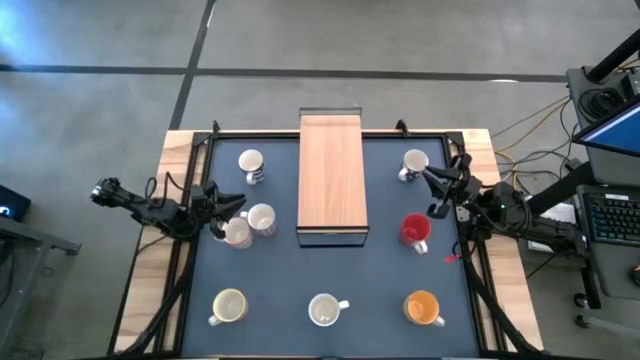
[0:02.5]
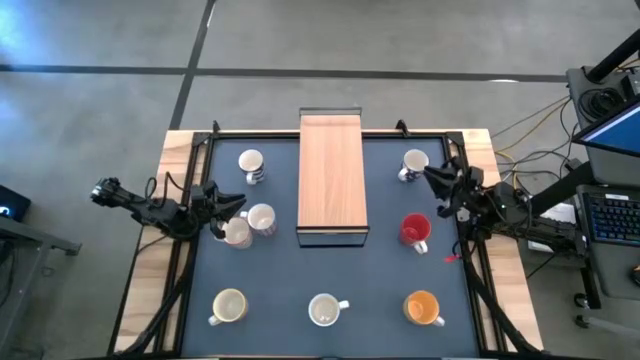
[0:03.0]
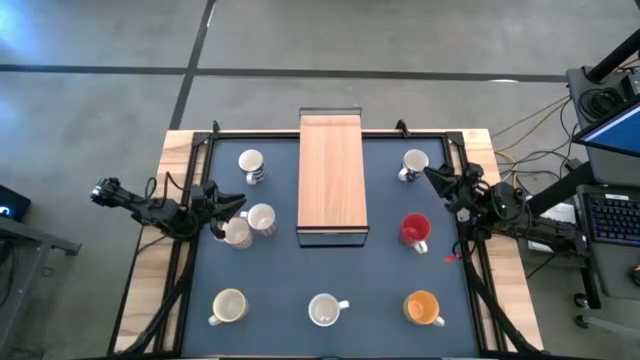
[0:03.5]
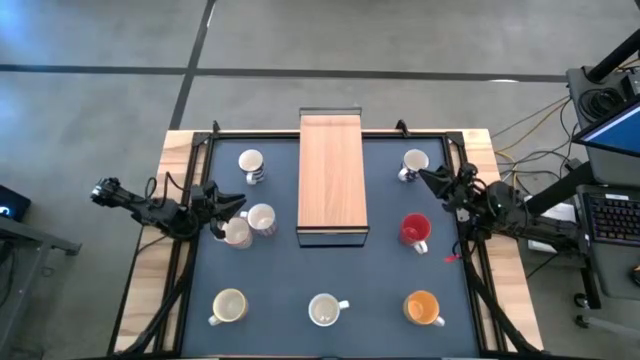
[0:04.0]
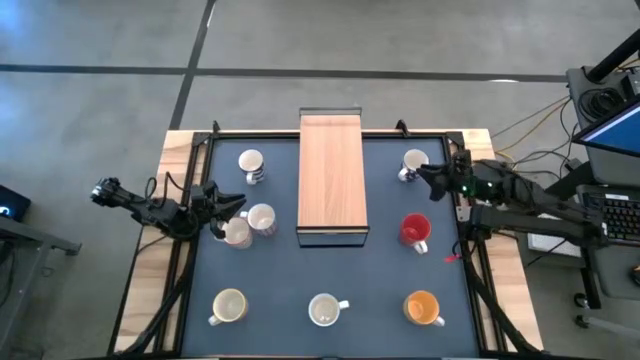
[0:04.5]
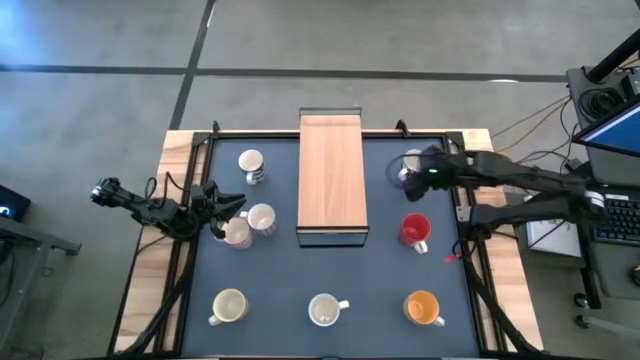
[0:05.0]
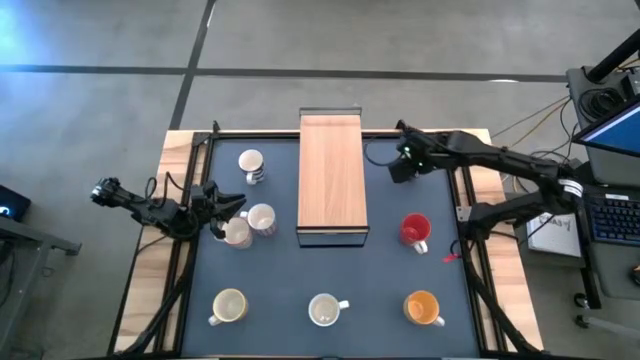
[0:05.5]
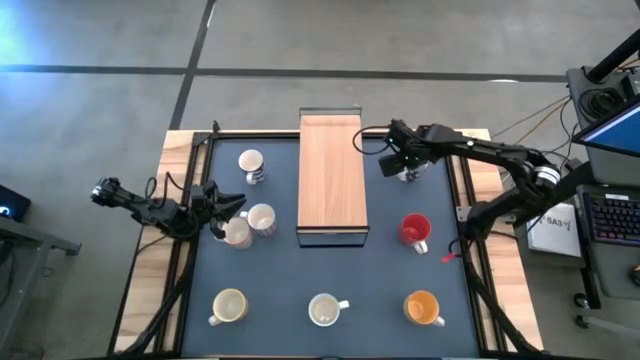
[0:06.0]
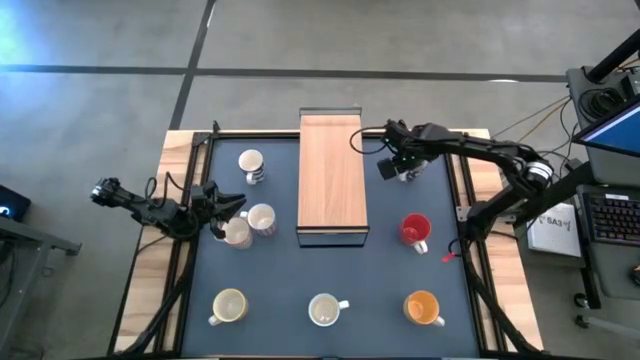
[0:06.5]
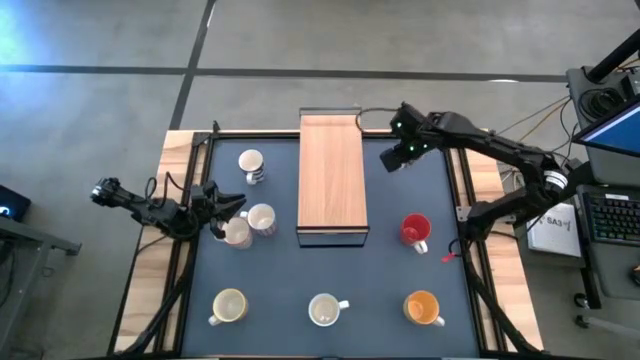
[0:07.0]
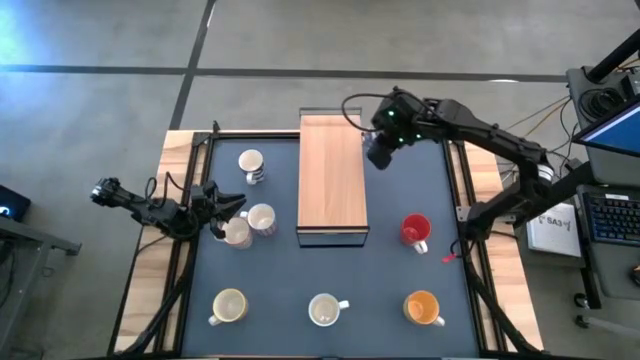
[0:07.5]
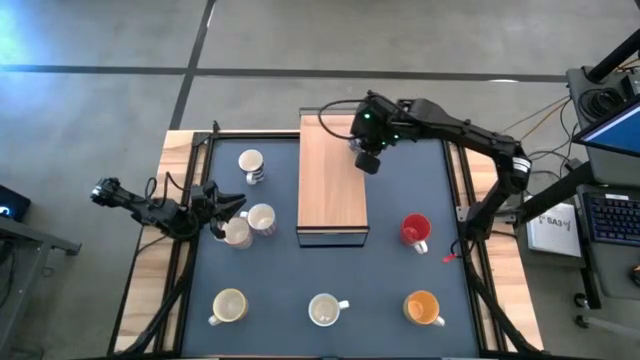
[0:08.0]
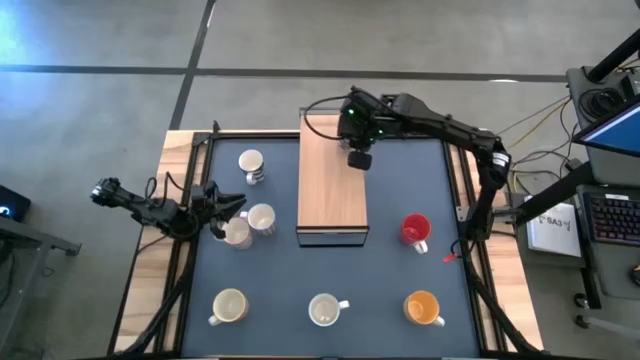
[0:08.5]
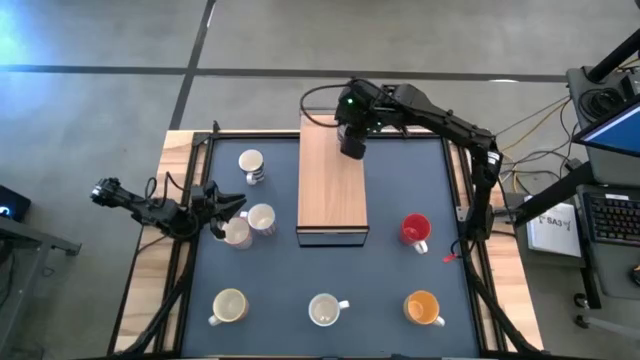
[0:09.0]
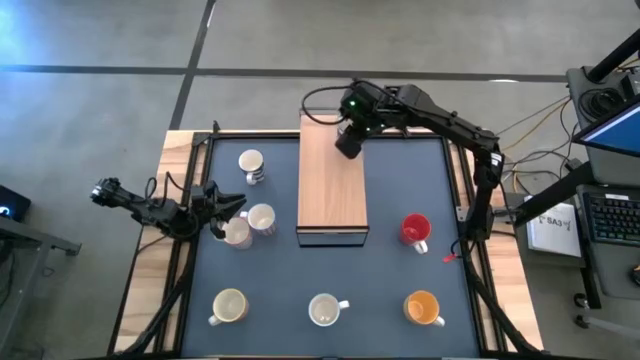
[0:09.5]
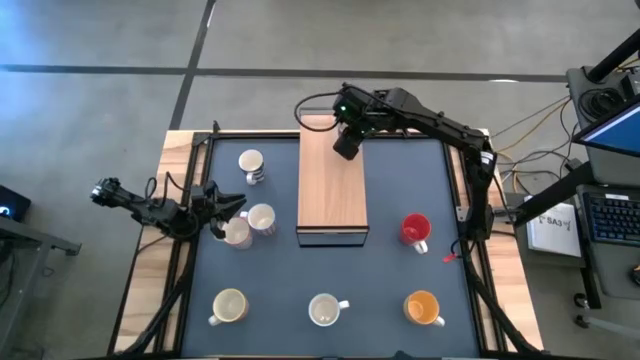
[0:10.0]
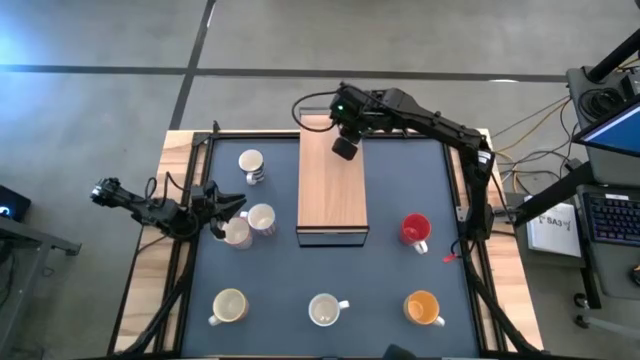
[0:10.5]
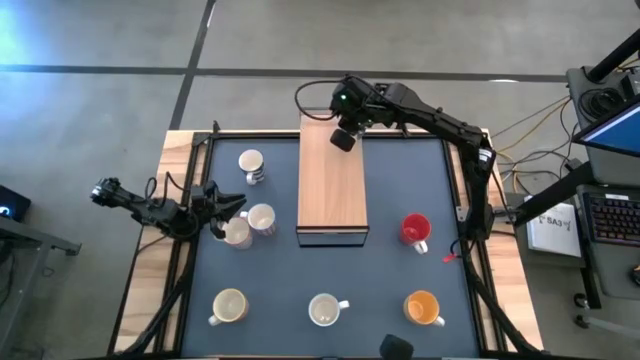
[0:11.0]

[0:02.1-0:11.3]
Task: Place coffee mugs
Put the right blue patterned mug on the shelf

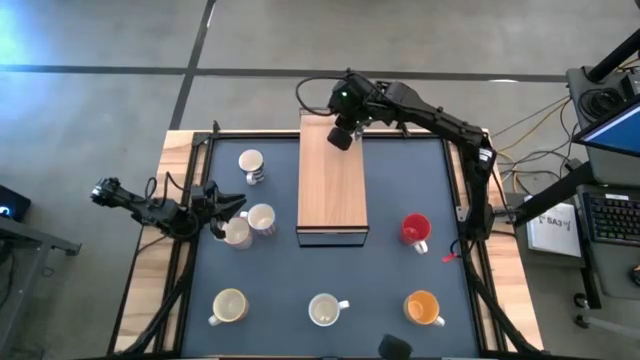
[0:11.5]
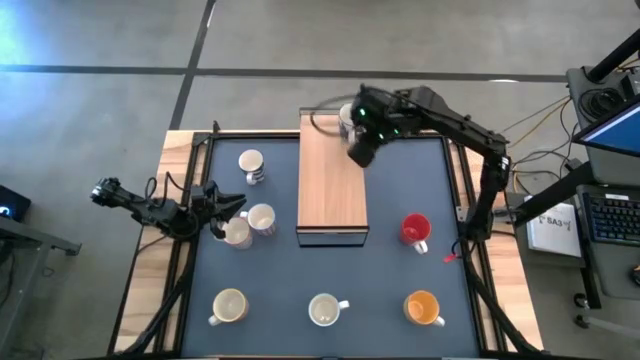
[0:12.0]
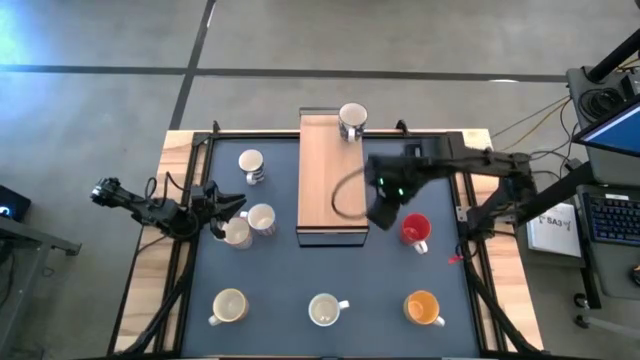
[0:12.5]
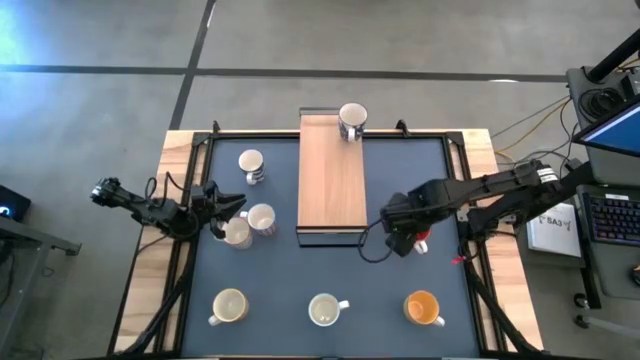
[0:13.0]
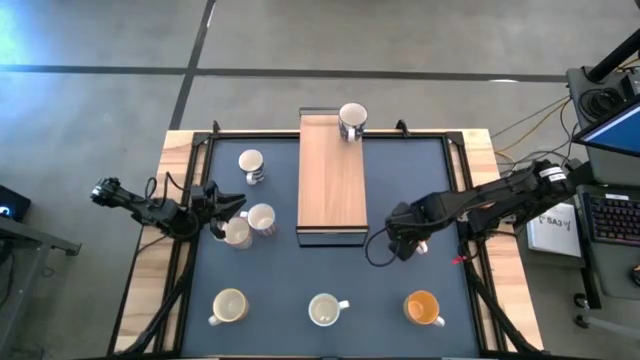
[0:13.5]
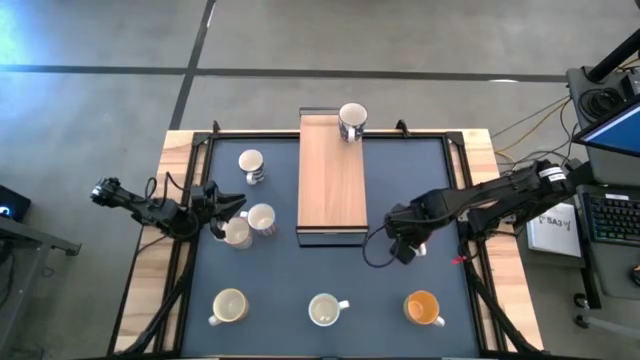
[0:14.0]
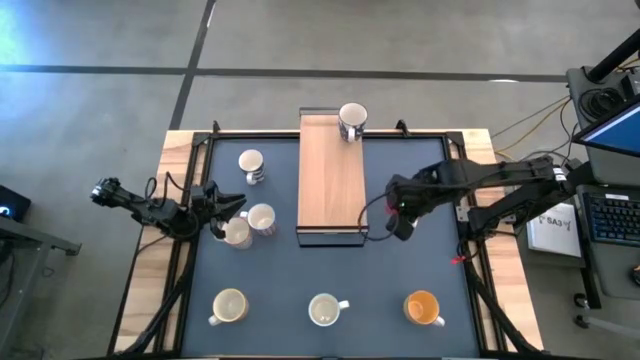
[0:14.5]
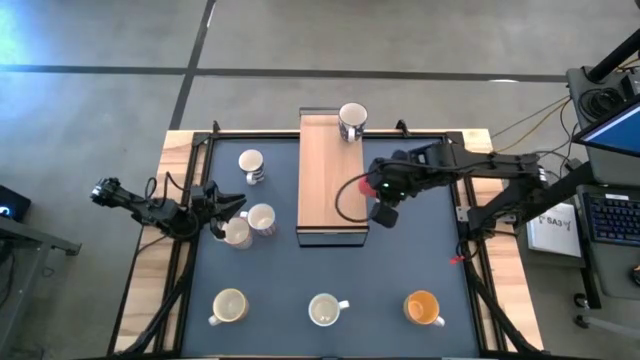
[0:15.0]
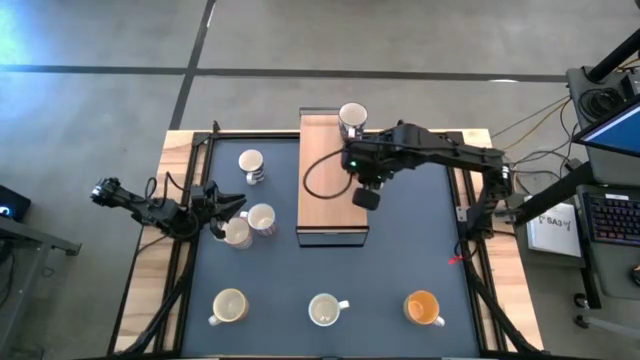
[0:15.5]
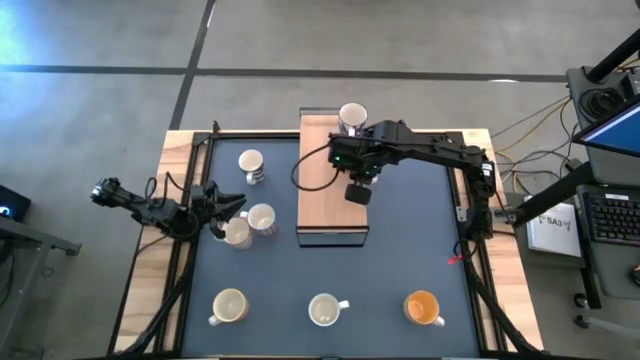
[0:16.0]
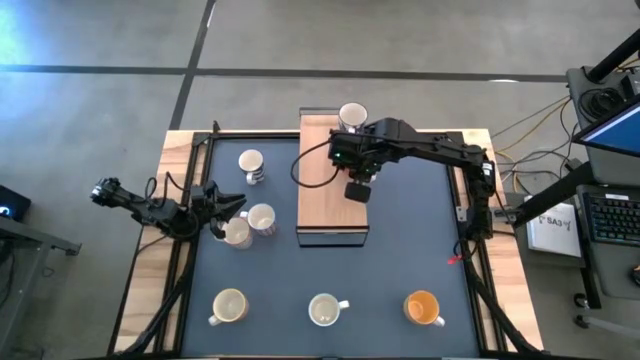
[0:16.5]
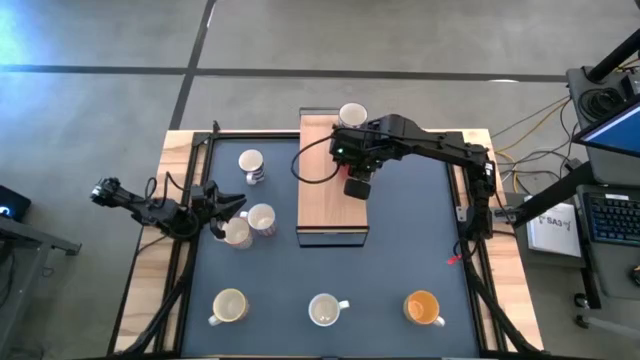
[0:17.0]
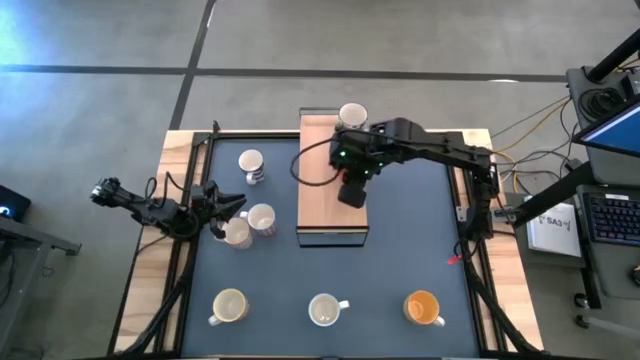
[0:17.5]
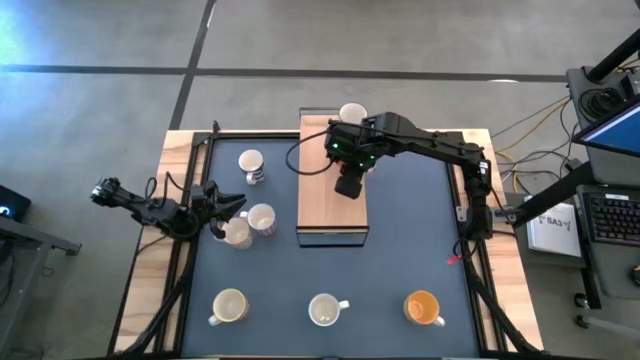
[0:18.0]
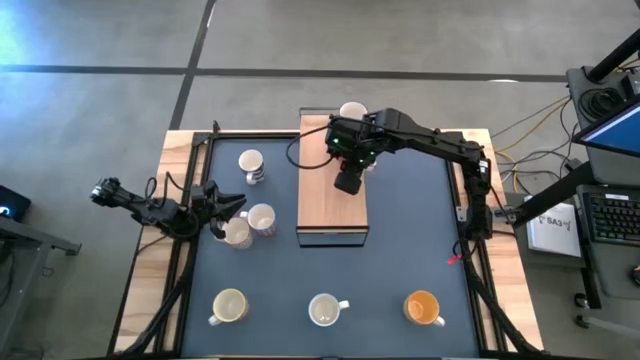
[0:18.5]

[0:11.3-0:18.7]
Put the orange mug on the shelf

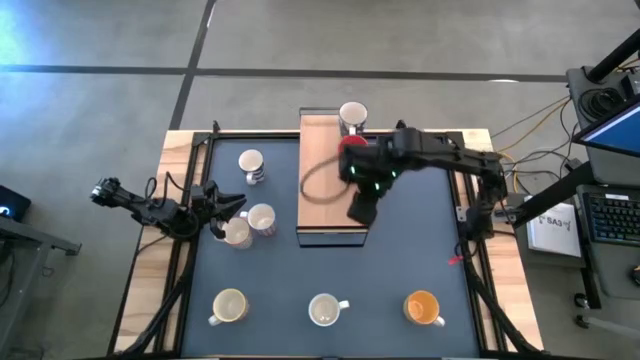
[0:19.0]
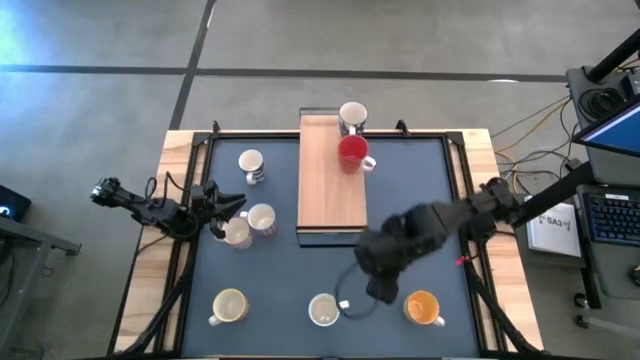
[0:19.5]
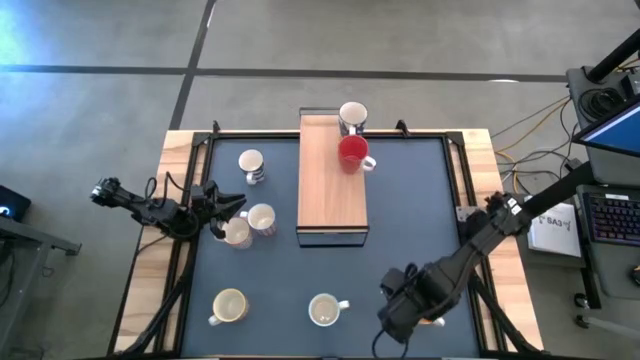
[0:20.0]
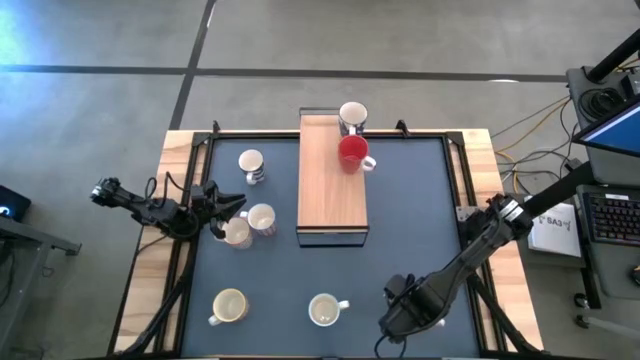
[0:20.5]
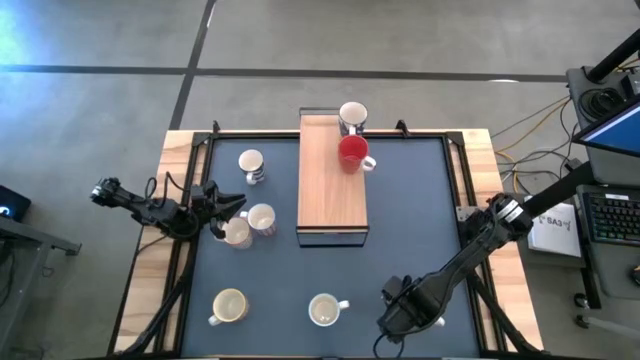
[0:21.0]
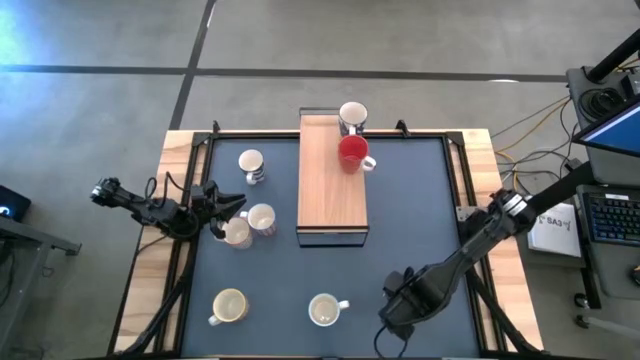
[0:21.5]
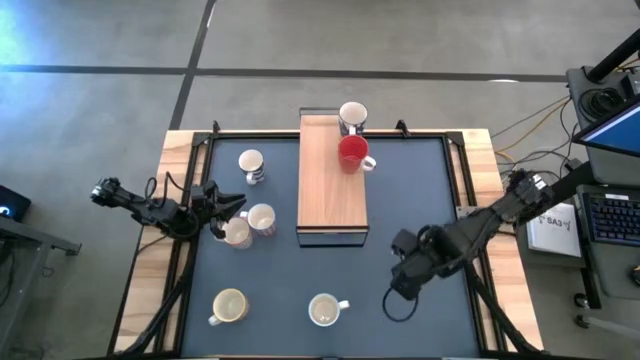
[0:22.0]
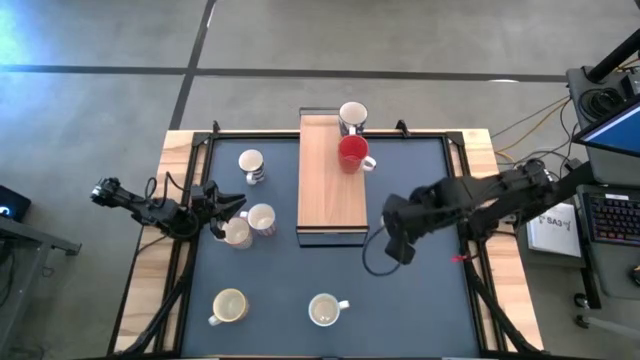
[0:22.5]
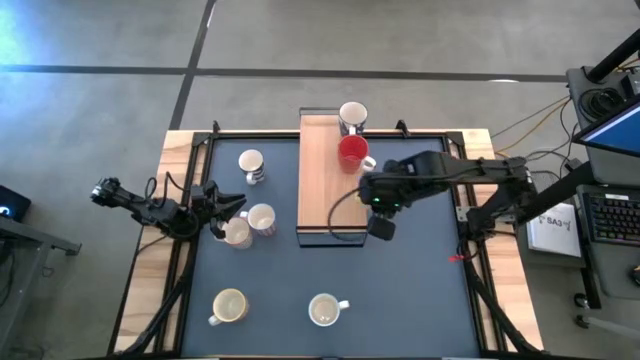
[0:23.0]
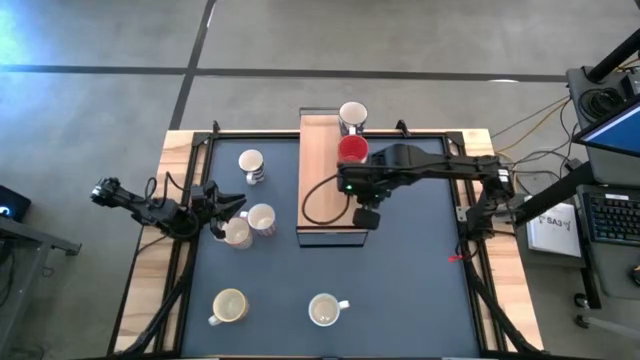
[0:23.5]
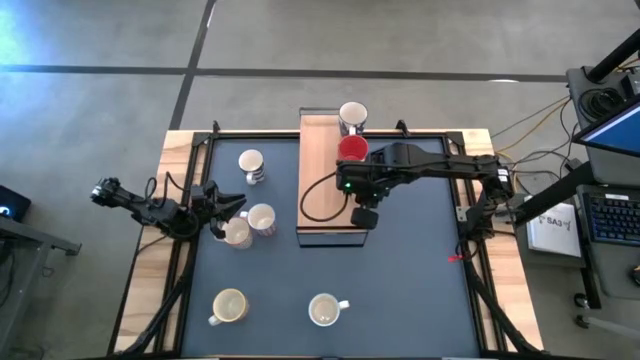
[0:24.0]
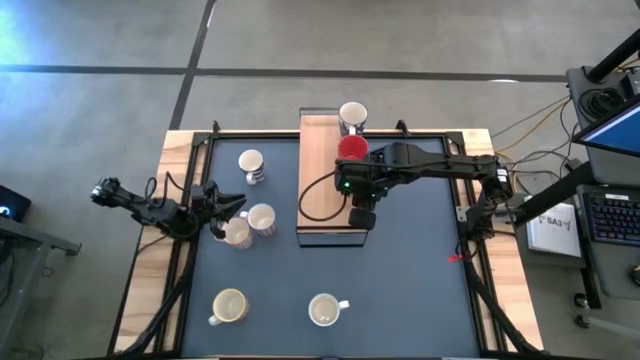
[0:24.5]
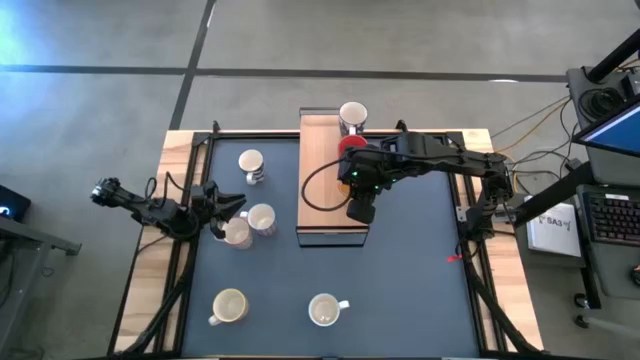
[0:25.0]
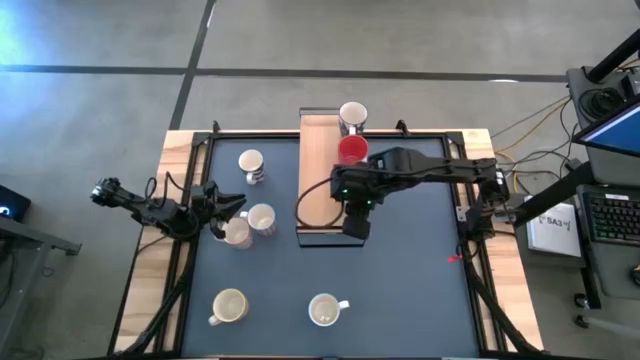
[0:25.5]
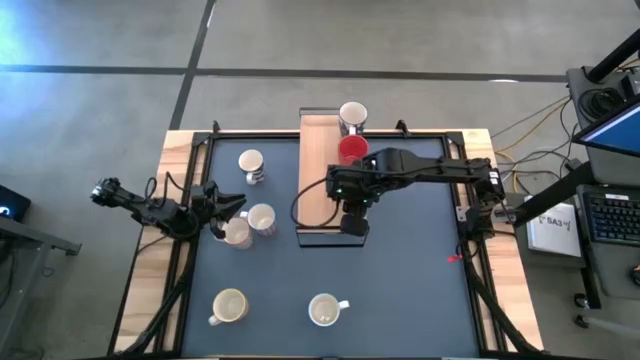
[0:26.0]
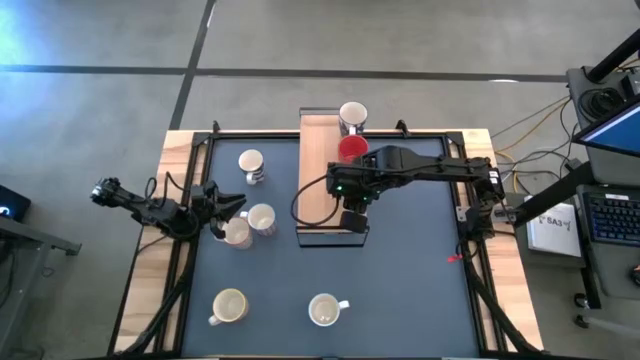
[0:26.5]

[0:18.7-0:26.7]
Put the yellow mug on the shelf
